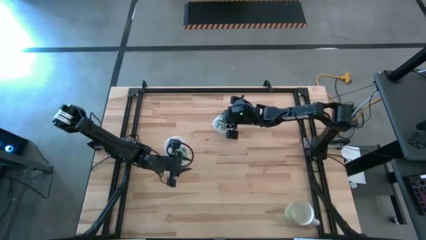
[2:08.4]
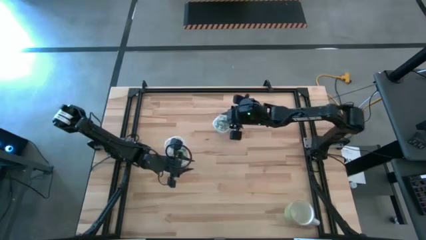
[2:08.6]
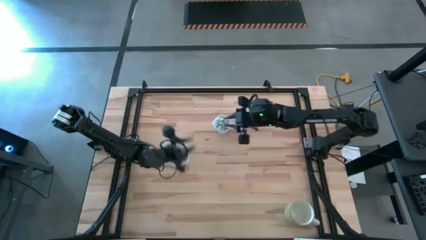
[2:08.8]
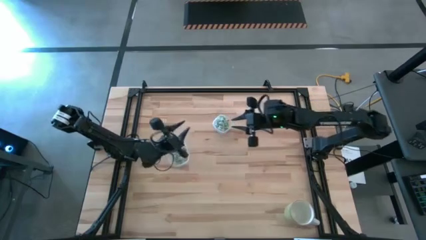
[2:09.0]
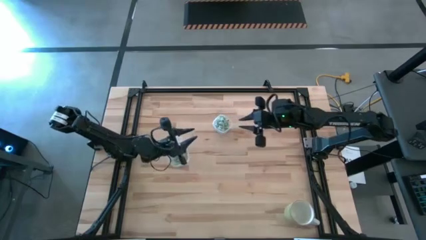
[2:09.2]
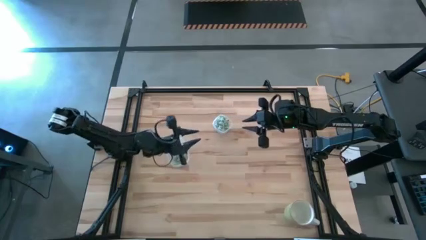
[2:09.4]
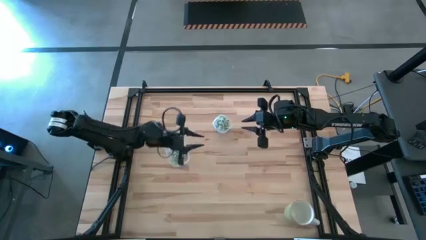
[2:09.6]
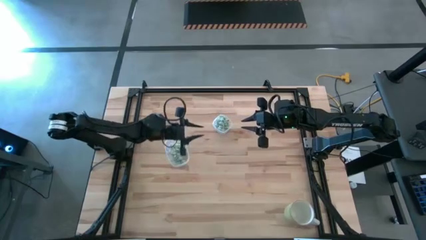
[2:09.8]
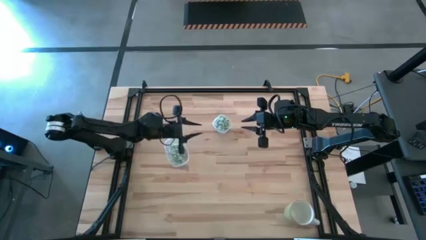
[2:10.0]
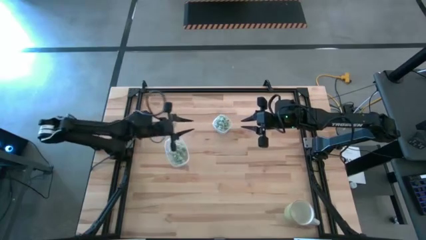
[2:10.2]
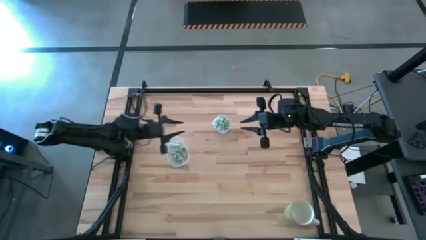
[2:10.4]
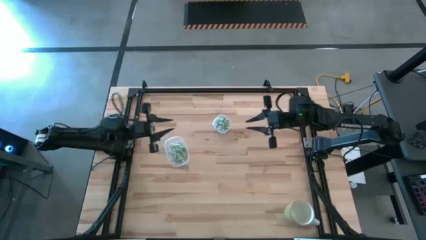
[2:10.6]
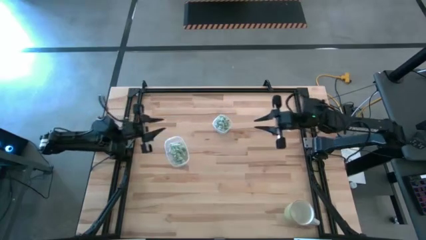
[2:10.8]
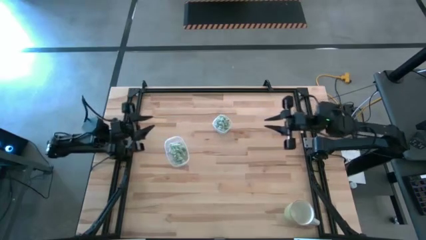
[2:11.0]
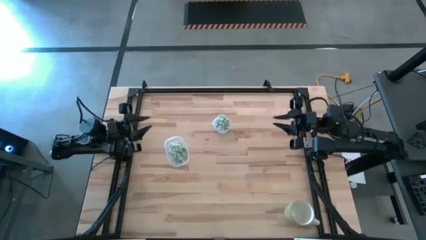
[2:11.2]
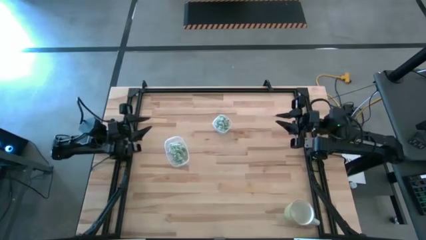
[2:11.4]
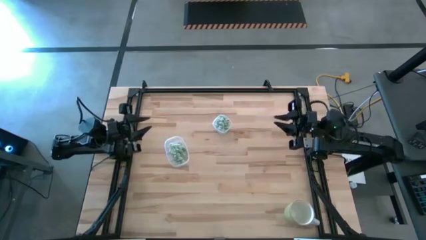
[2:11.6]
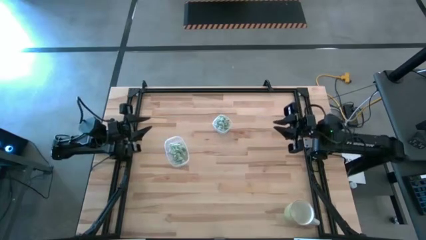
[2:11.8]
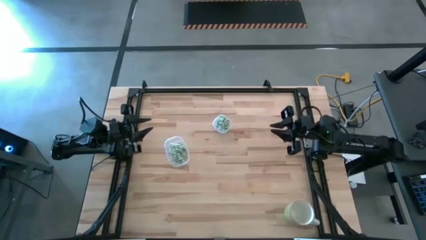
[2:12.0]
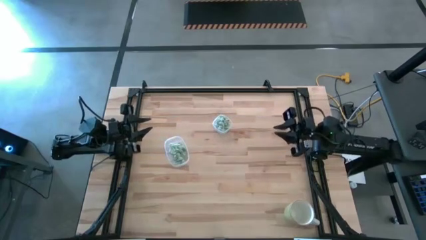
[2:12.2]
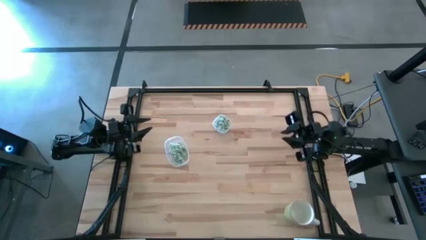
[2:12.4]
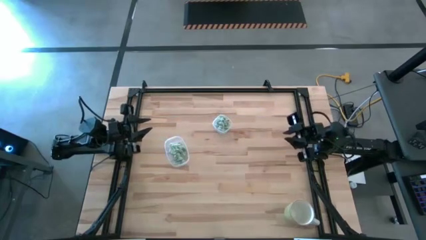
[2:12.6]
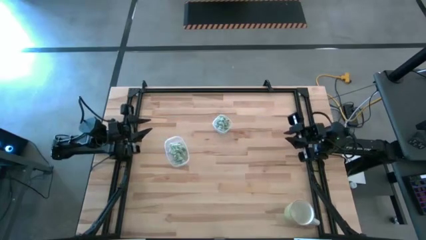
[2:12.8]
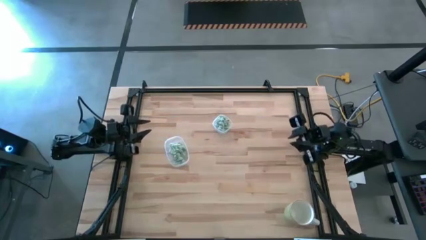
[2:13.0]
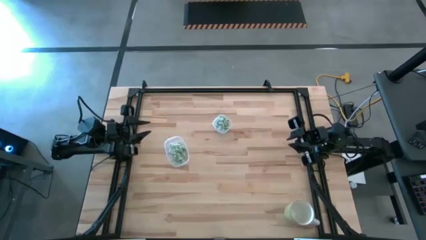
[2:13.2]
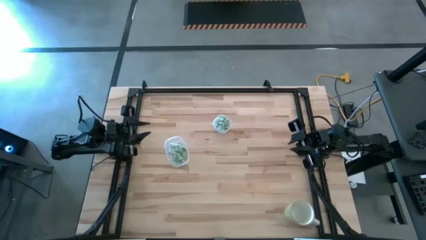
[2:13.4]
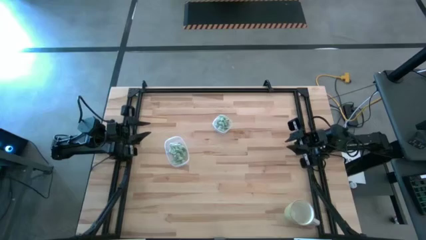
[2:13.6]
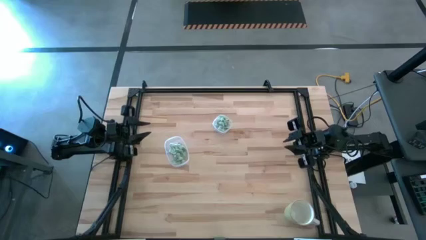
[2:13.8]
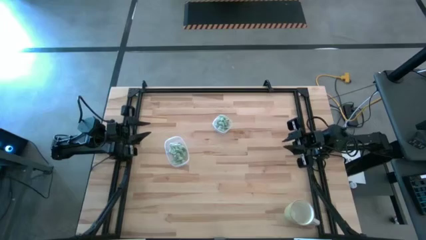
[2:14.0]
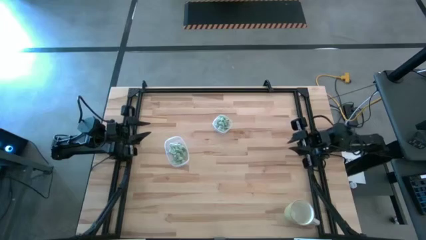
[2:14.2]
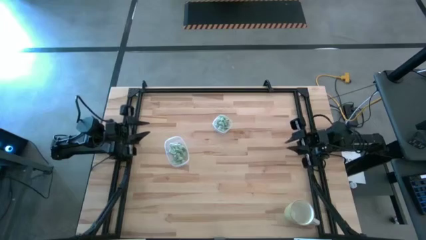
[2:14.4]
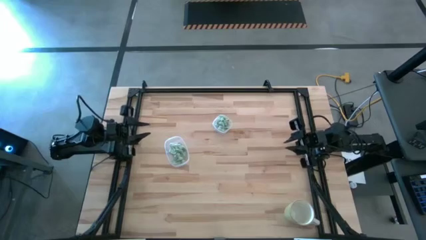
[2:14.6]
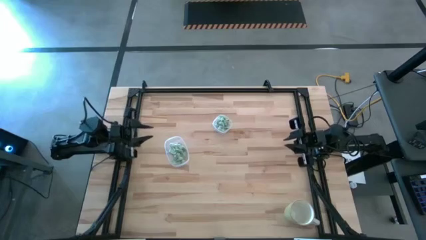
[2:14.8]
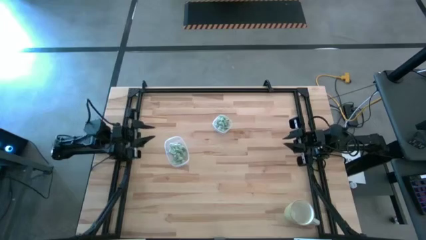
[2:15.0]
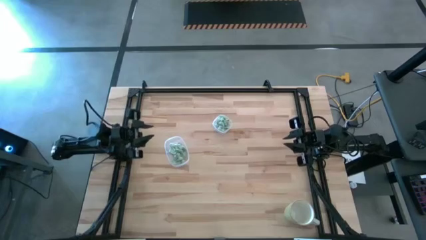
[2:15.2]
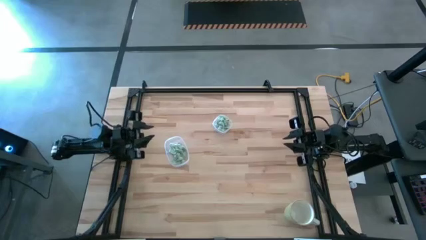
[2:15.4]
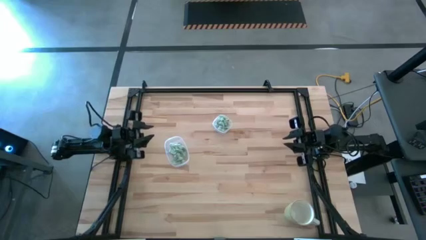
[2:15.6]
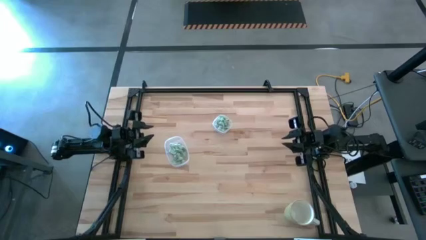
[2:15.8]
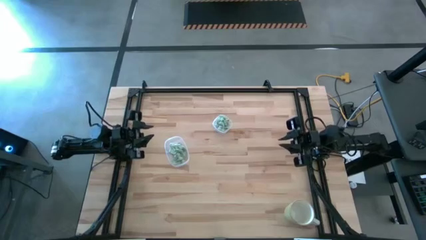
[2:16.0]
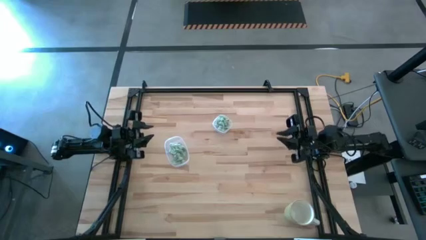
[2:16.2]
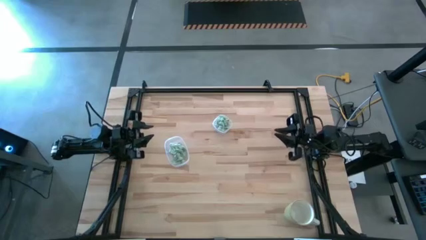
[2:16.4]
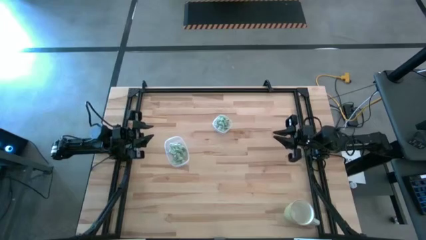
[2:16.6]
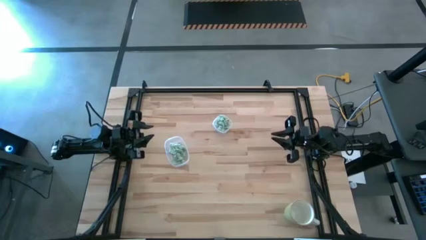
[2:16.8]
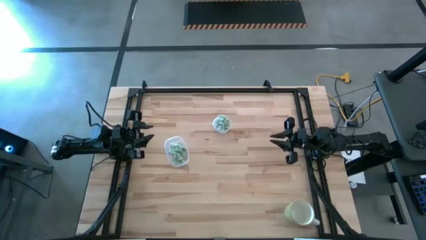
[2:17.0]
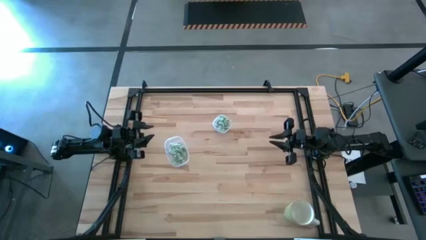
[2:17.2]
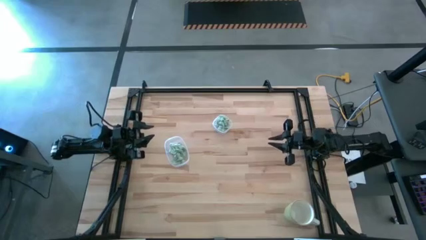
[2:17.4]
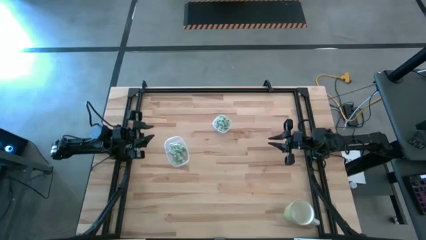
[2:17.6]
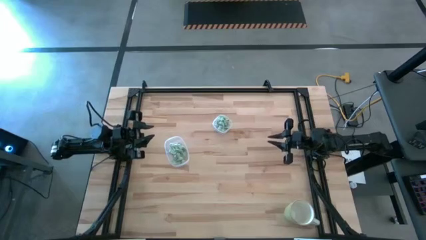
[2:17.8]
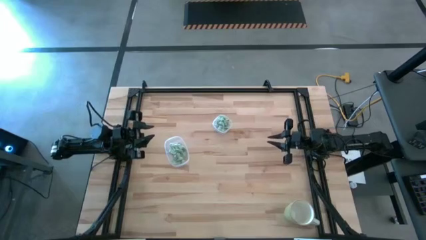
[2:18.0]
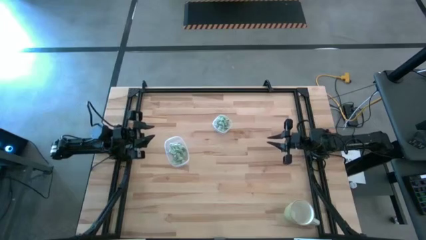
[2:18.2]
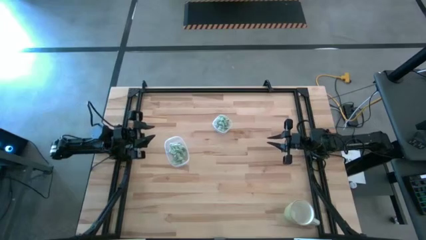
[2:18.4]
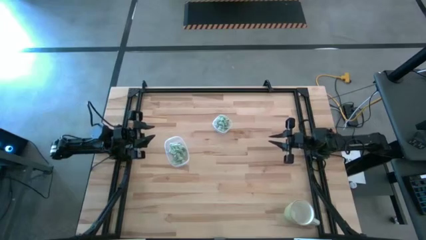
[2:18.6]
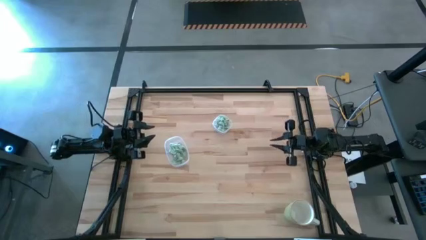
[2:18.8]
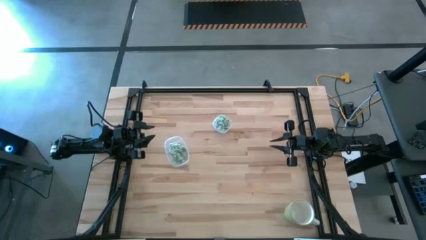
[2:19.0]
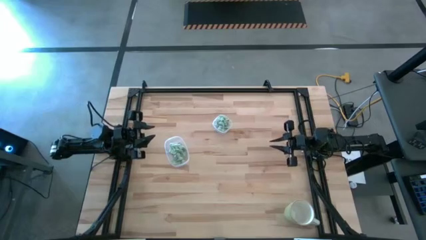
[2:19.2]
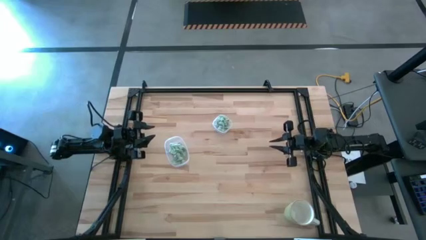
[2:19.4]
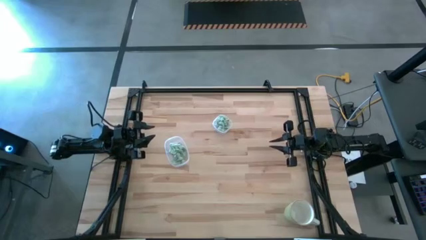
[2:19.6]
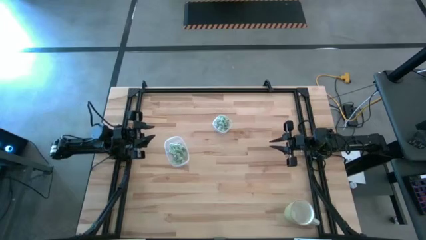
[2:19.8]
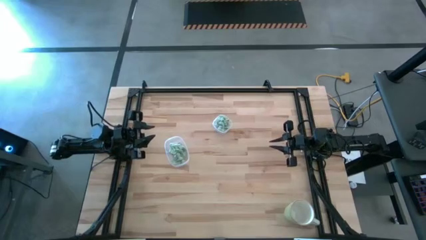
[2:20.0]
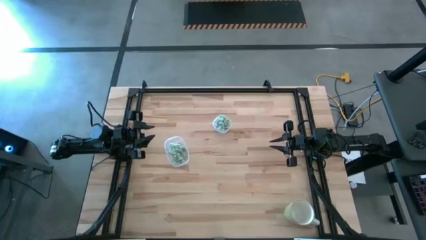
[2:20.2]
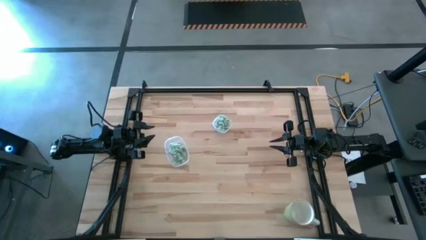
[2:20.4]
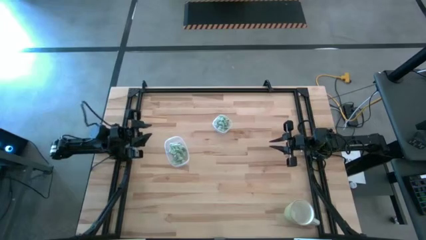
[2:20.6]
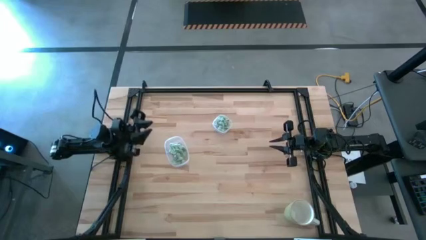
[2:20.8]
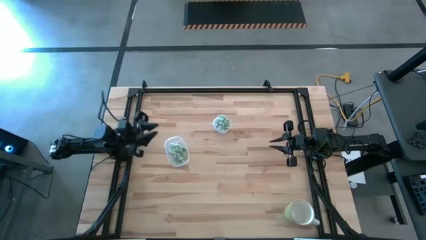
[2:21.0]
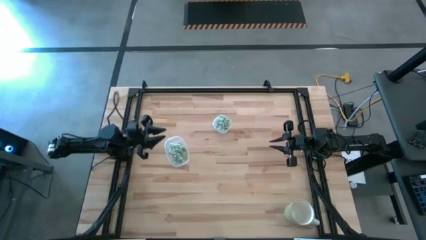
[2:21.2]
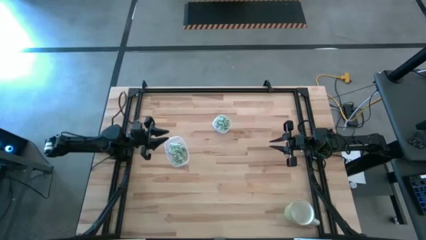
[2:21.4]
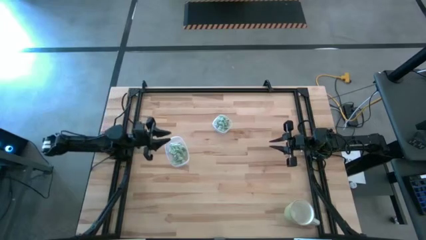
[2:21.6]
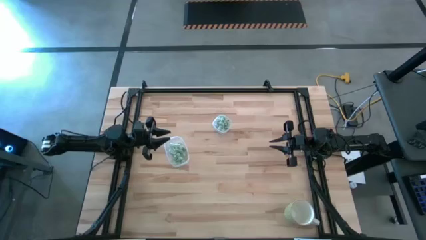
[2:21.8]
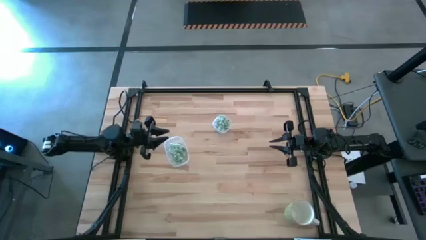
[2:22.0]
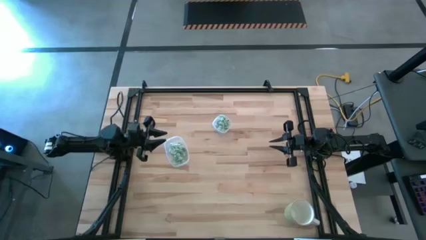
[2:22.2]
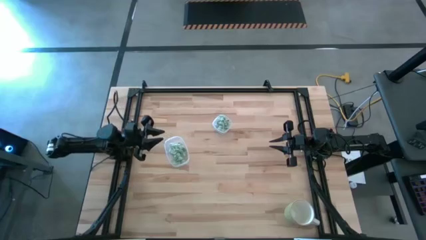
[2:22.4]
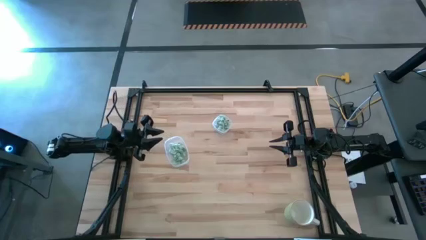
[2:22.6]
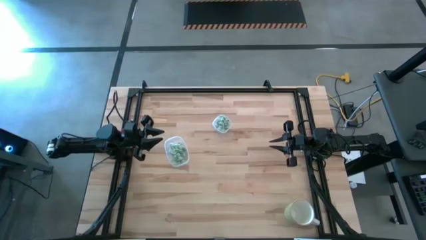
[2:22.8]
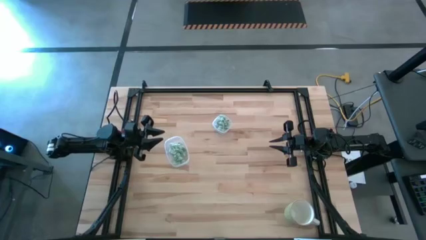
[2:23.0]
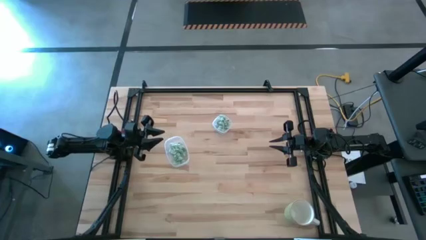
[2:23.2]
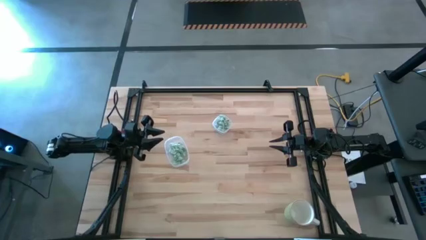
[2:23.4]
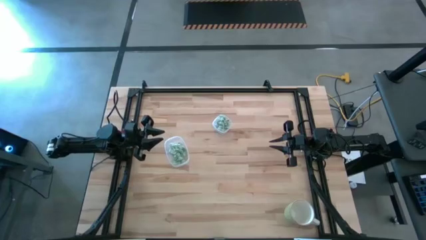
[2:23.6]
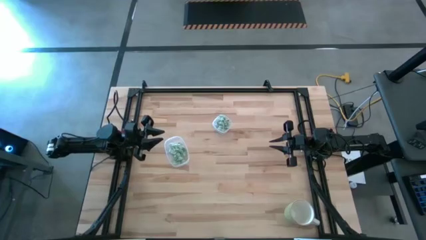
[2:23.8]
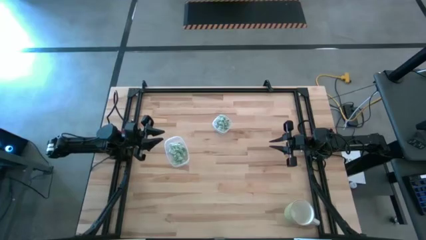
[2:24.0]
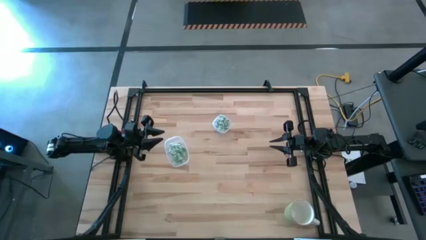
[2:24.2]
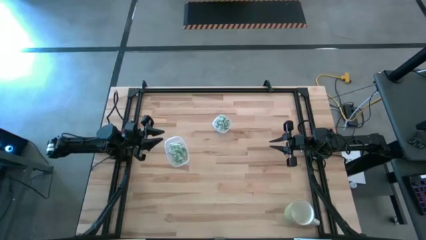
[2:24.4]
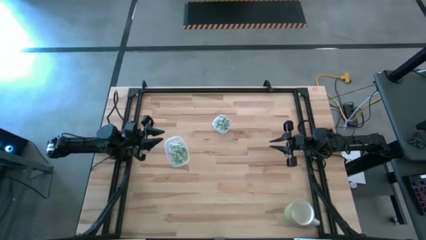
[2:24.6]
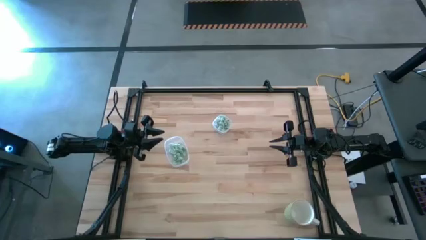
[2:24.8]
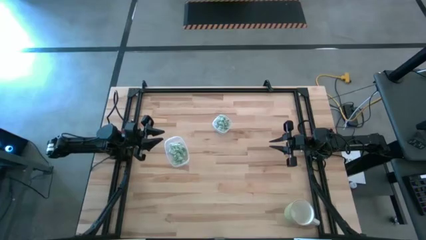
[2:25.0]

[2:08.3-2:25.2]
Task: Pick and place items into bin
Return to Home Position
